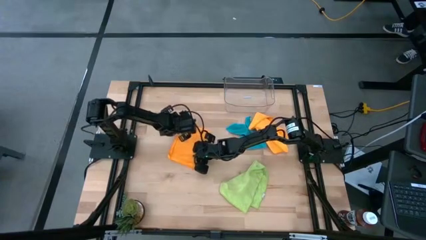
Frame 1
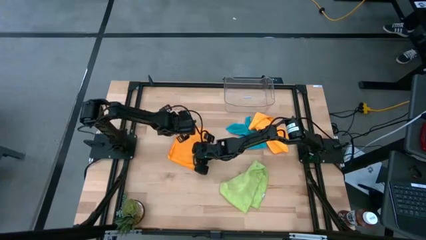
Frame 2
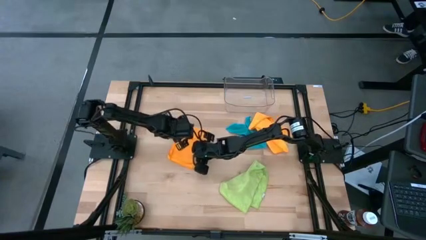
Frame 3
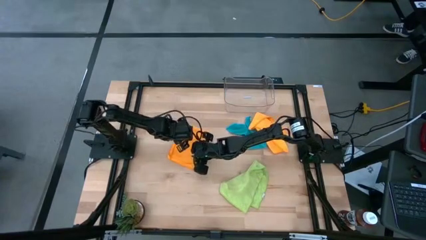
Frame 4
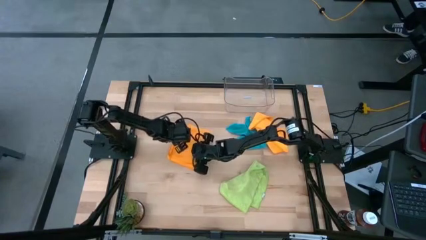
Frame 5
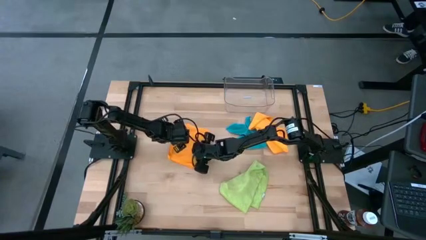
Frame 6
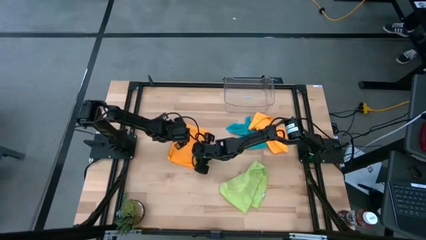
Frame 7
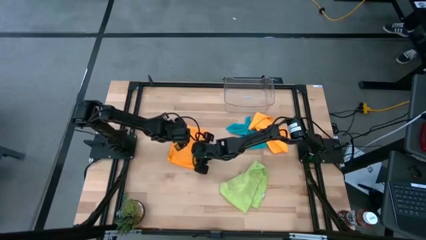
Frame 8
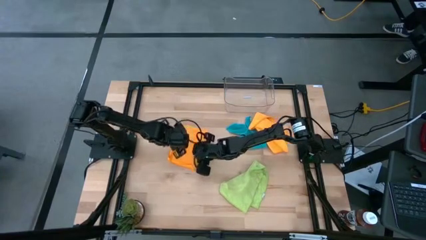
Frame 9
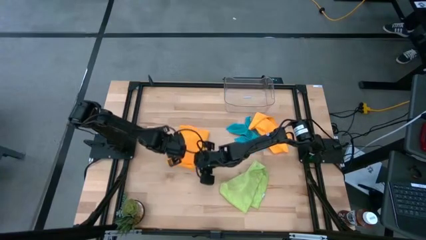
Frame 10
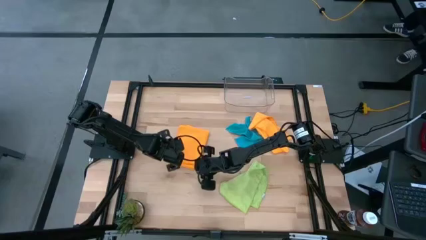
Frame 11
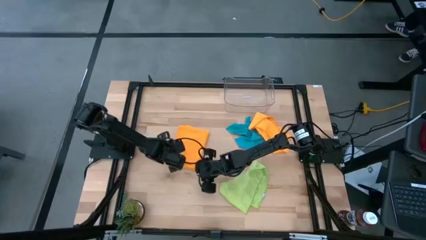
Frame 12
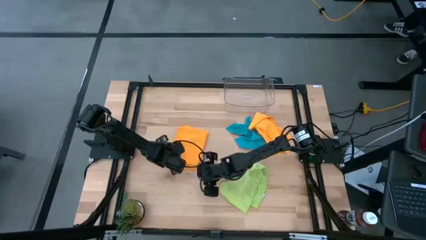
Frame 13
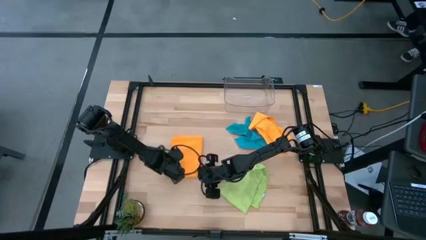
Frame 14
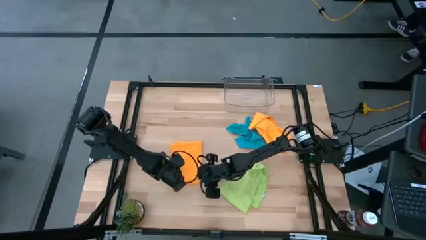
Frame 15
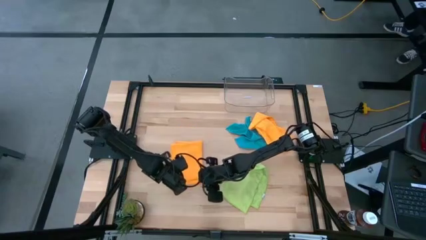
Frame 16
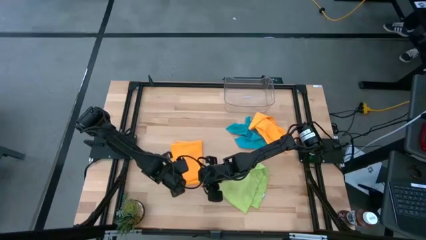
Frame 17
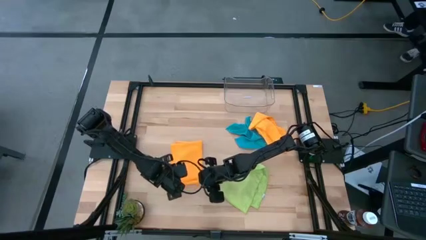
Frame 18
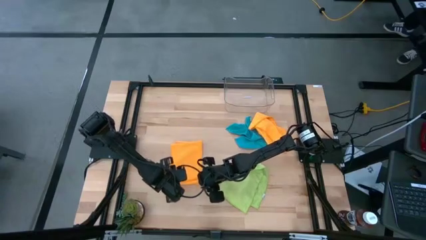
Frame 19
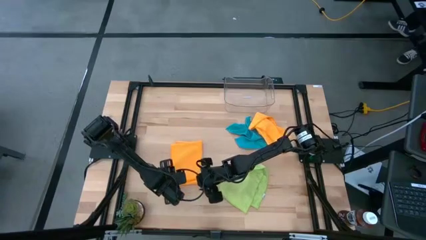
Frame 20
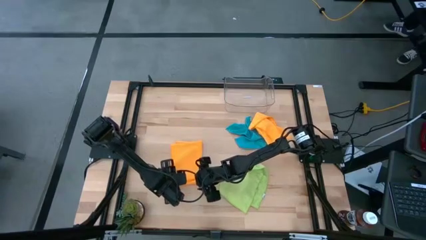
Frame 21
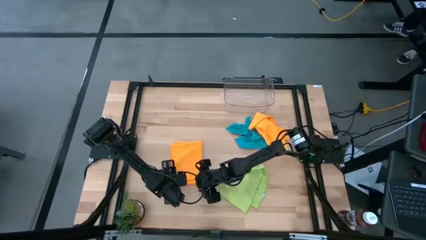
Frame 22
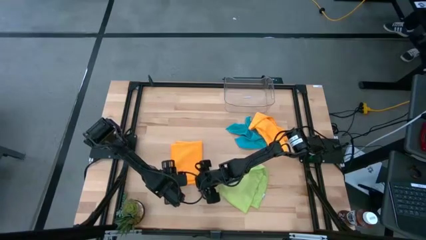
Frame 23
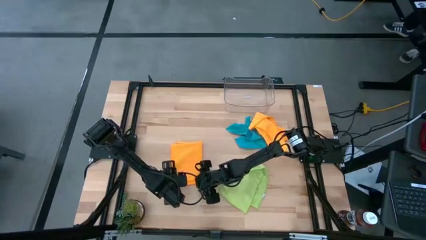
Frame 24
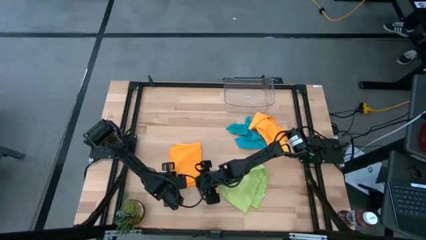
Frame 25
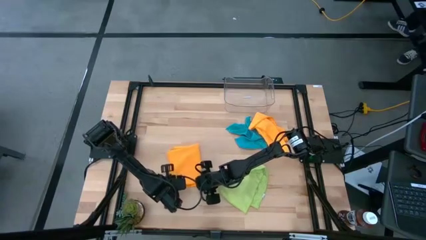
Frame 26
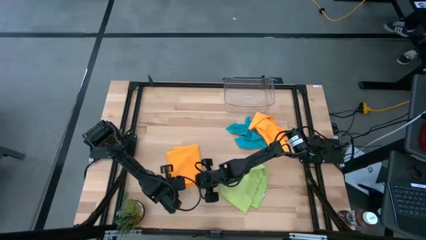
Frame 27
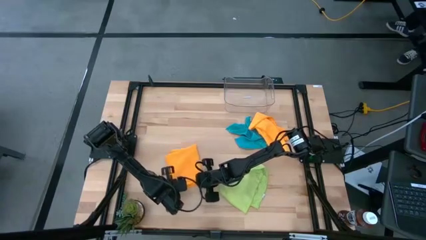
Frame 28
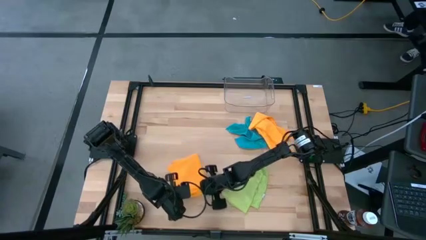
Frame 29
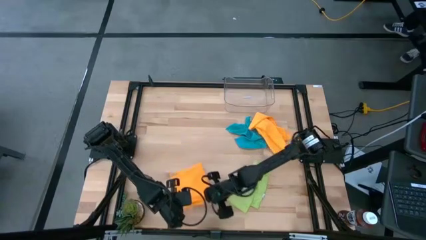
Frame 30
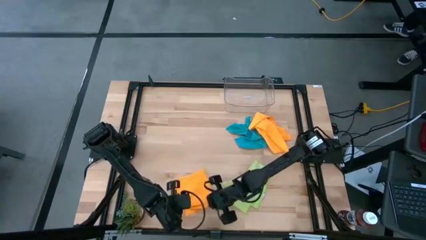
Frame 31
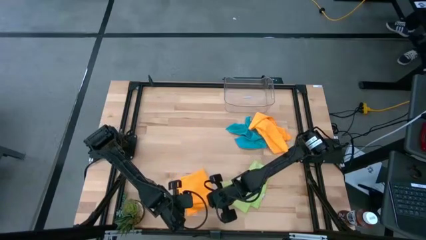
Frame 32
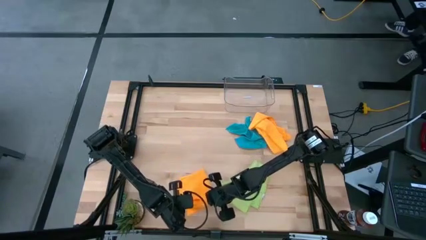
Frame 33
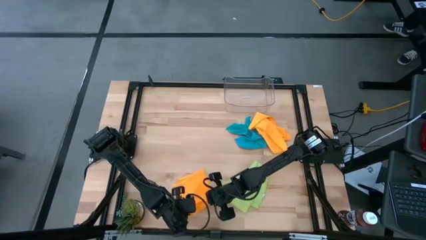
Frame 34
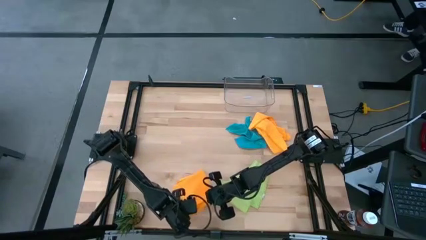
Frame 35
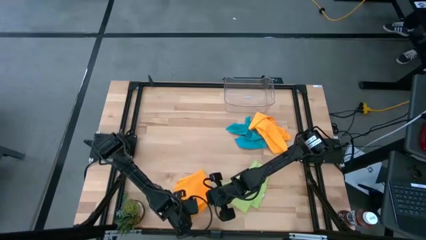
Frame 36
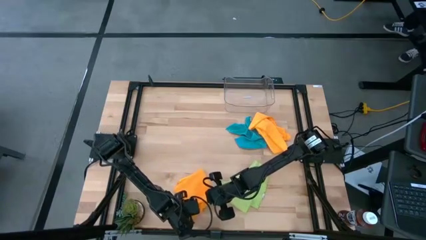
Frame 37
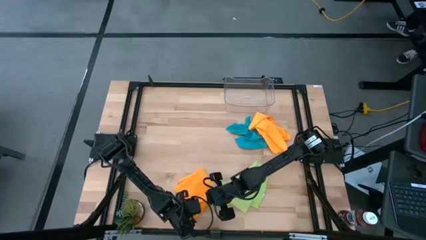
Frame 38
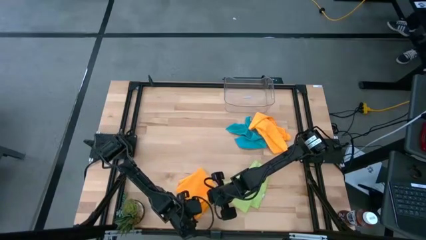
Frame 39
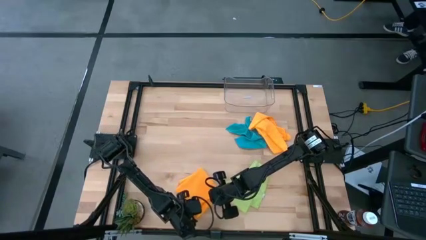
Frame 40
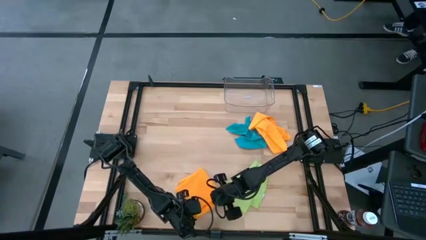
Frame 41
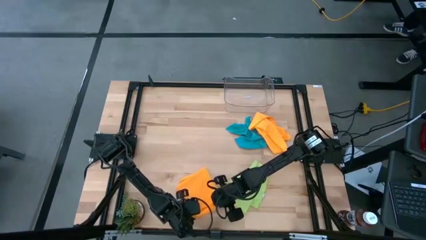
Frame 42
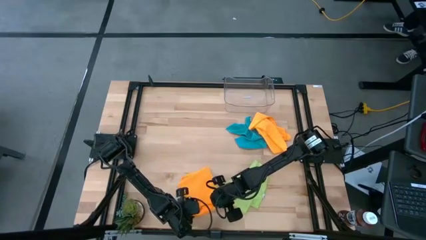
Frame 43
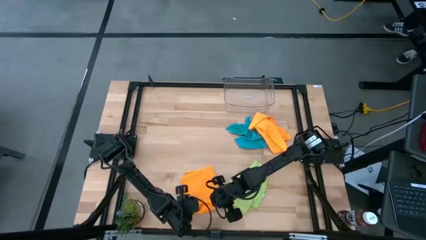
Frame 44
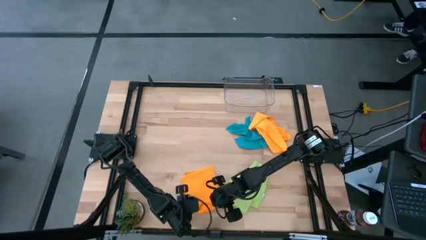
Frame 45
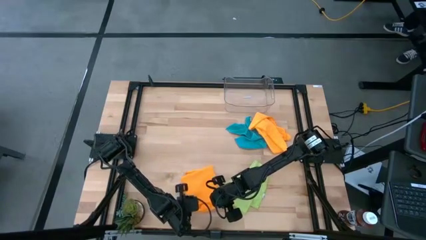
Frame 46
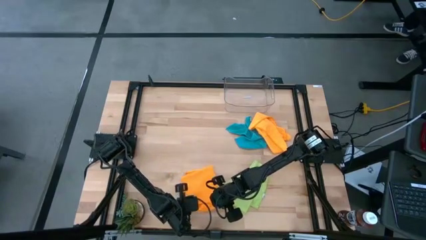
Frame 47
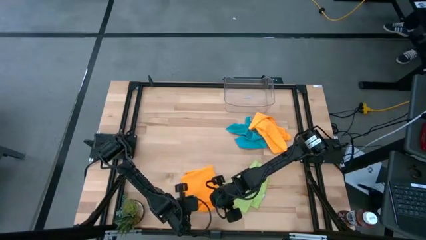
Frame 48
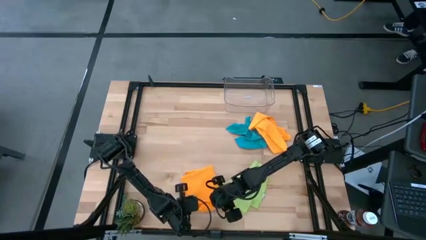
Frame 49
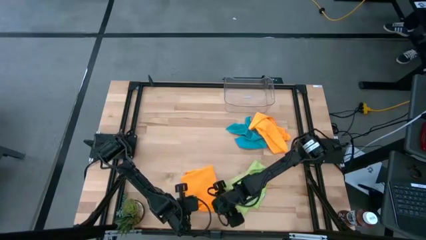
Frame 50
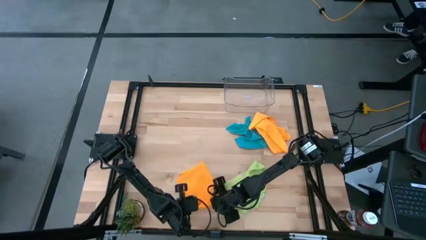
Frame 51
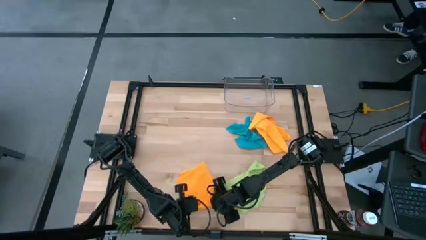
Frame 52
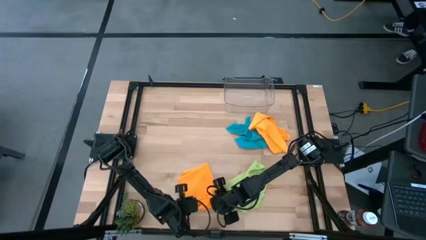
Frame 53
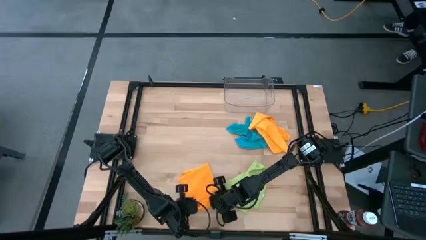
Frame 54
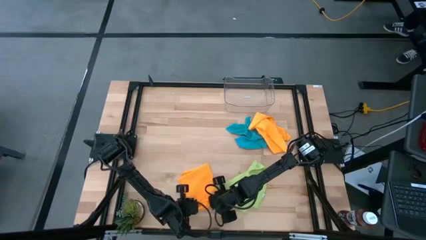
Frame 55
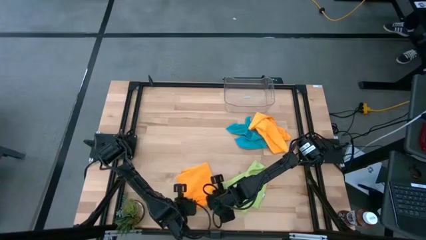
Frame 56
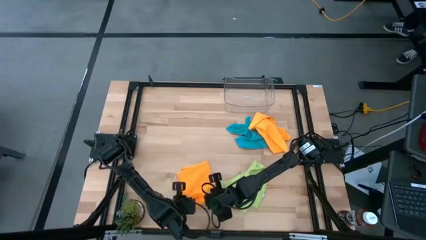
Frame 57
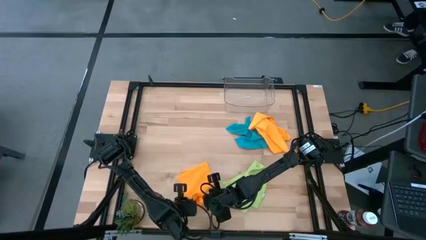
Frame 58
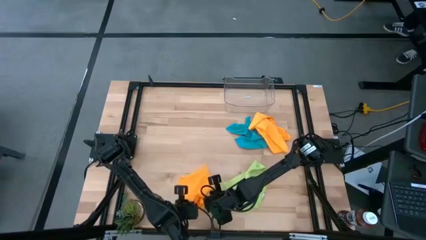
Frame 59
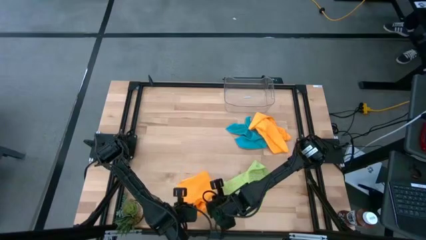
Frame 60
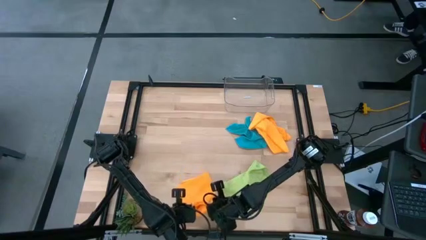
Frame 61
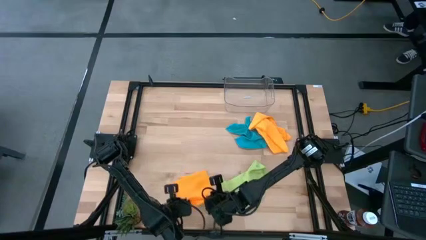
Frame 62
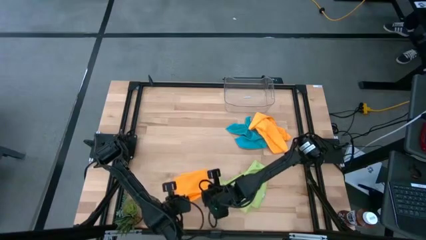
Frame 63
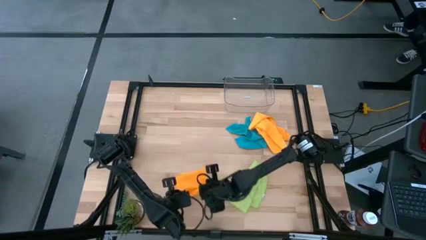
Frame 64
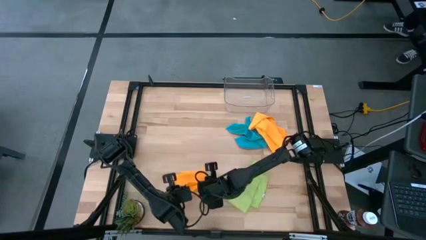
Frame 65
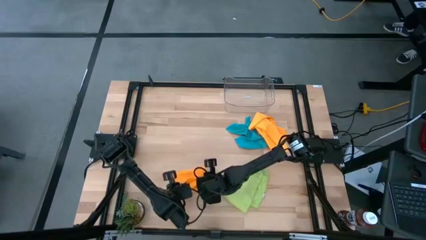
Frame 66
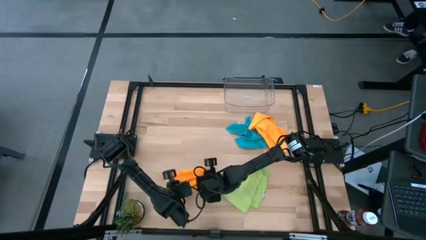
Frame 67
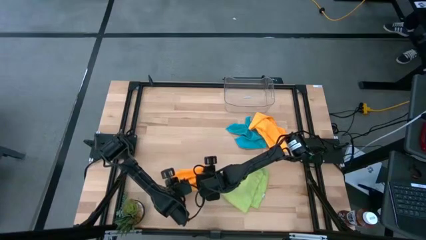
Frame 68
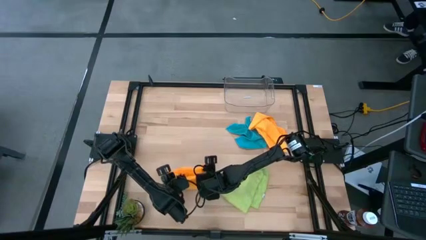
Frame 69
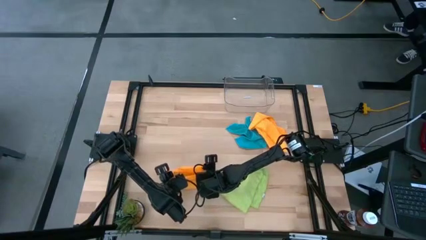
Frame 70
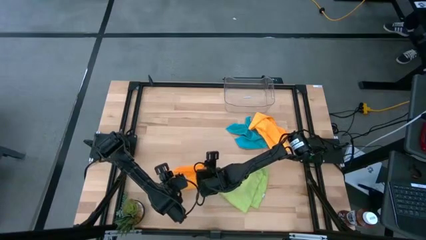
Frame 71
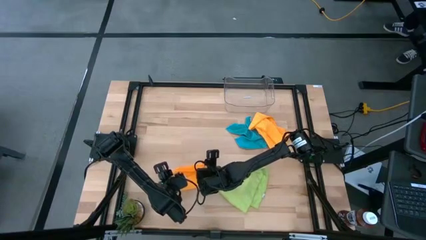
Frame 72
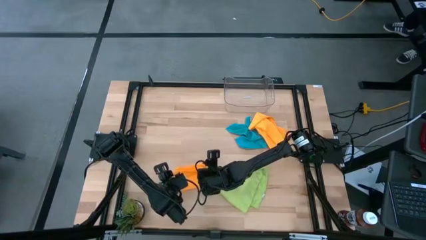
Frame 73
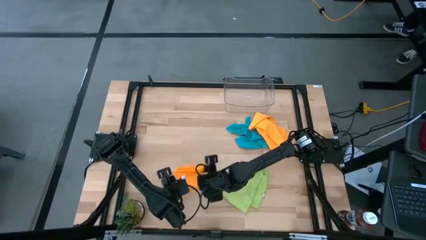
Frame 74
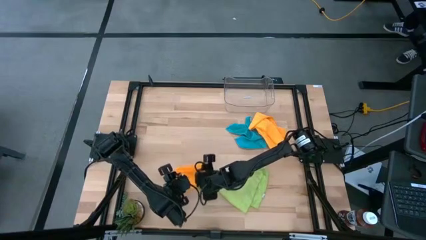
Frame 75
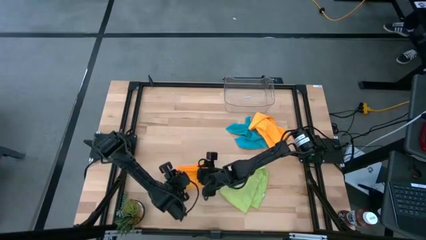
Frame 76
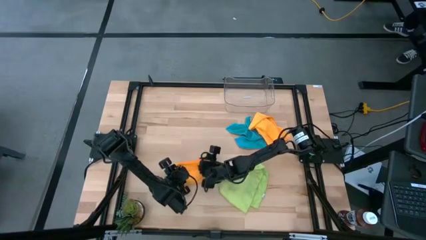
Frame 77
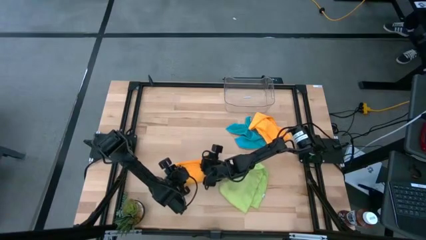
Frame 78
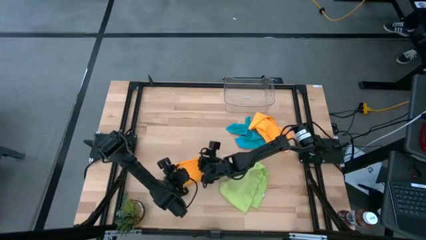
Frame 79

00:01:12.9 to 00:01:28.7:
Task: Fold microfiber towels
Fold the left yellow microfiber cloth
